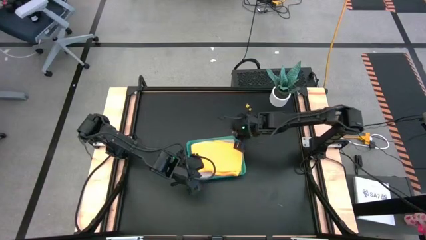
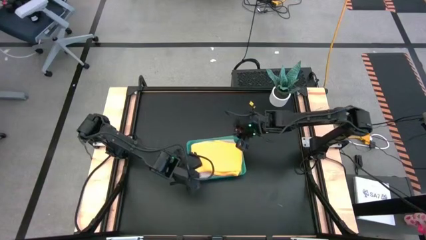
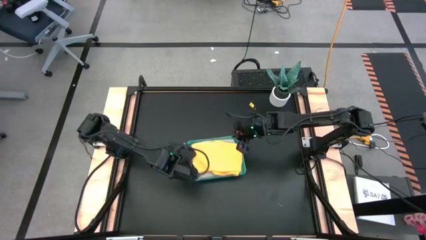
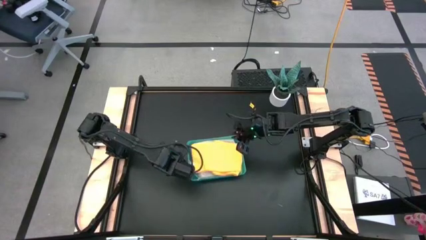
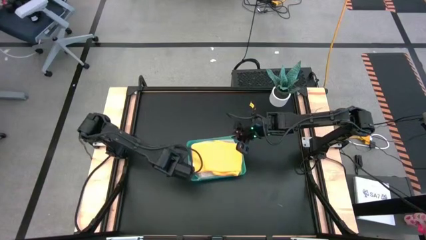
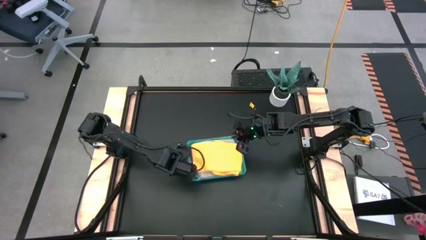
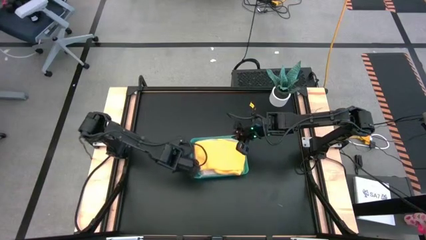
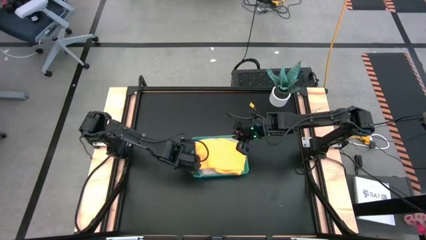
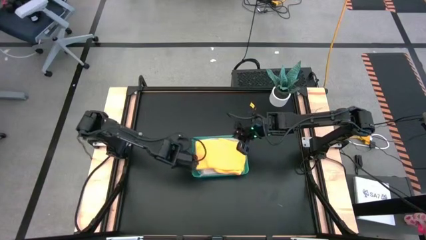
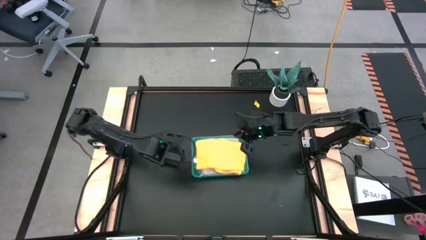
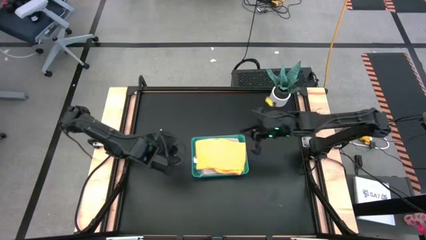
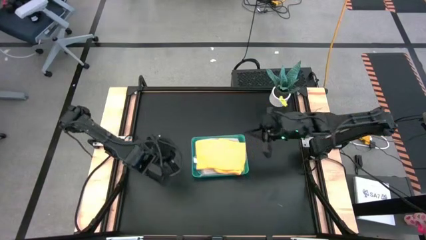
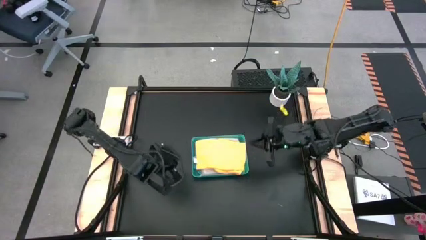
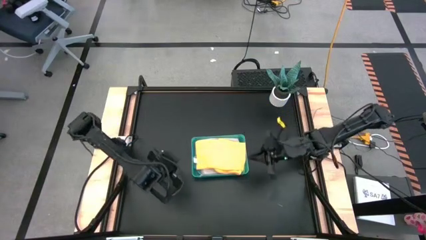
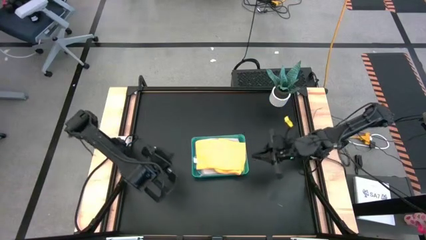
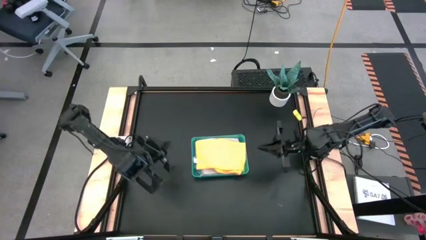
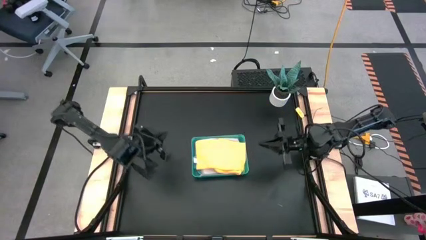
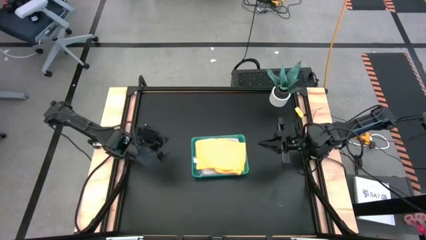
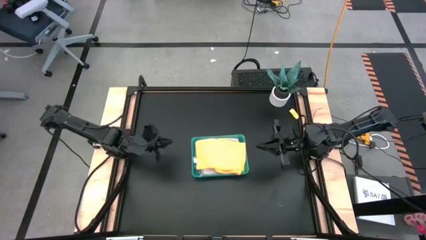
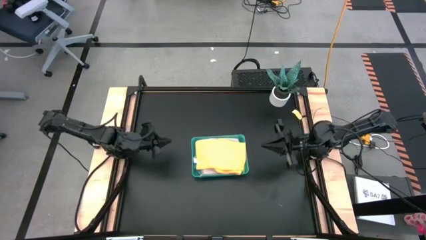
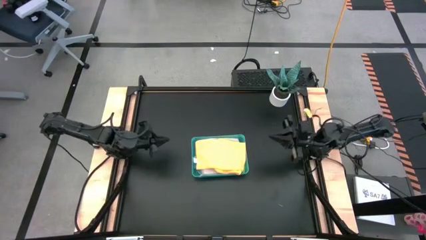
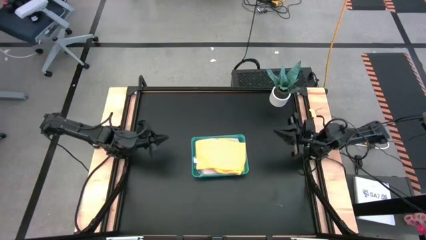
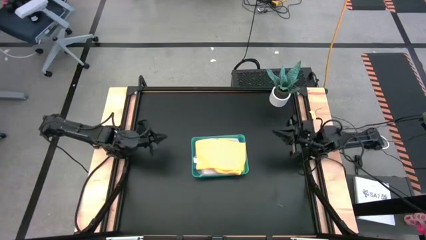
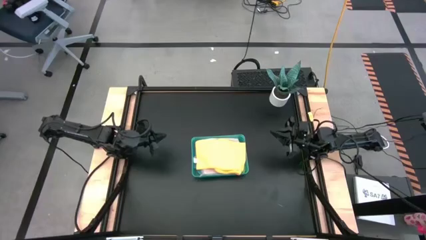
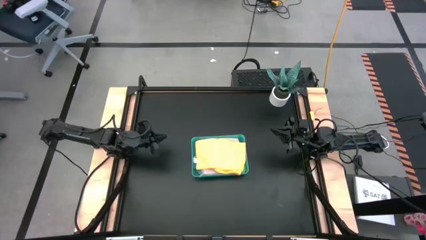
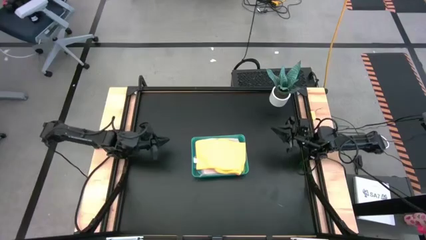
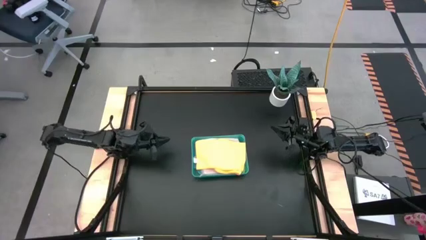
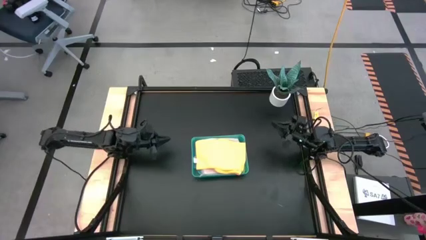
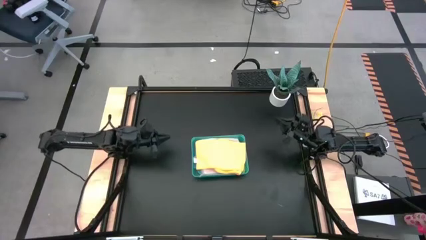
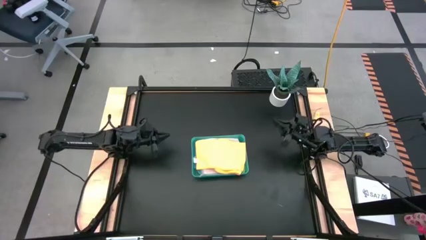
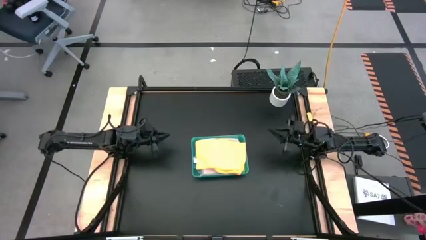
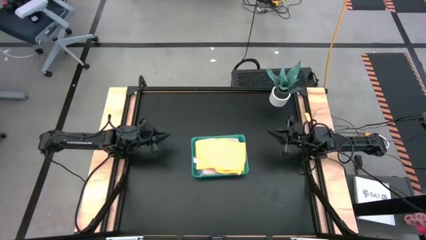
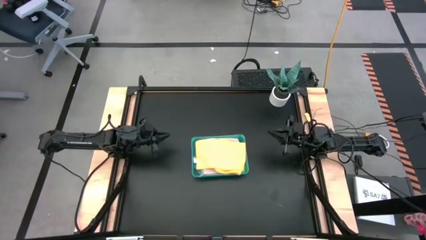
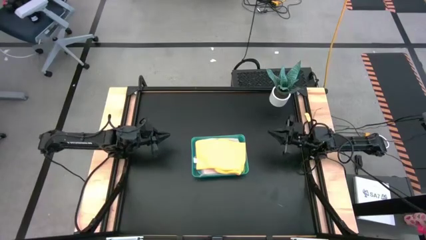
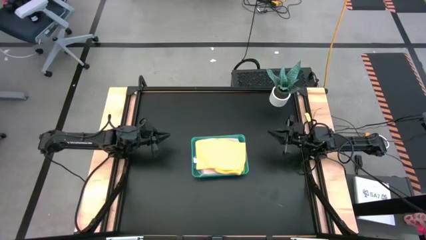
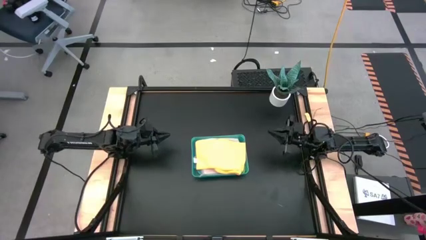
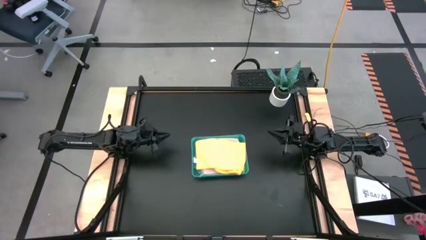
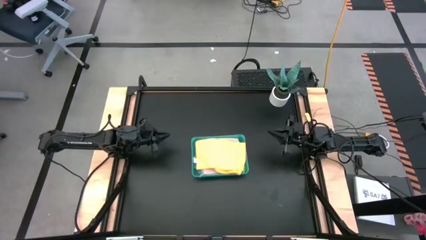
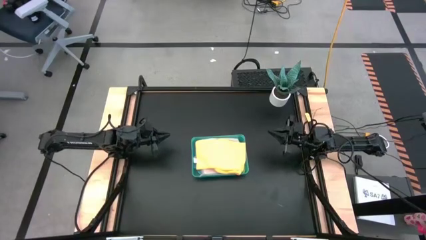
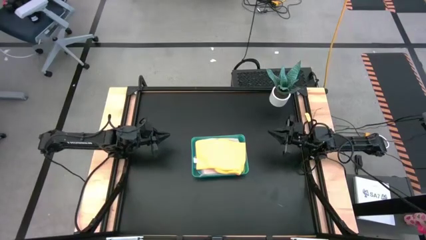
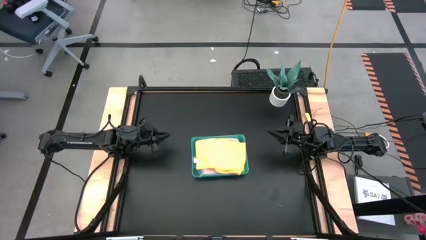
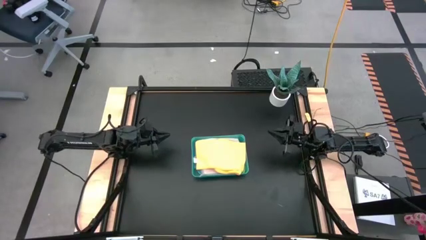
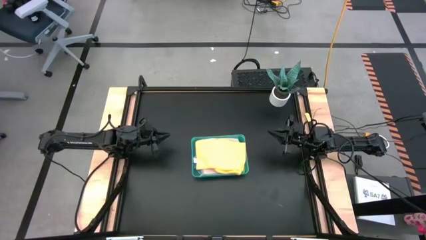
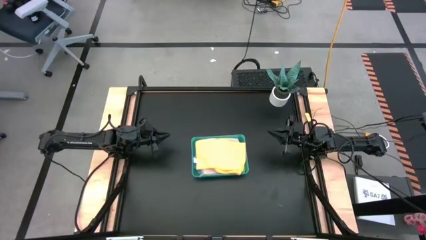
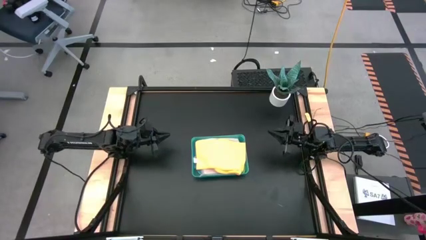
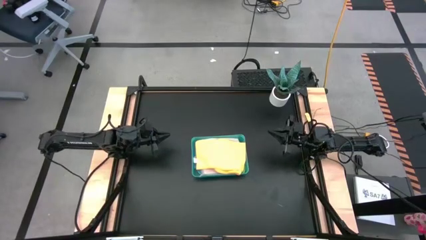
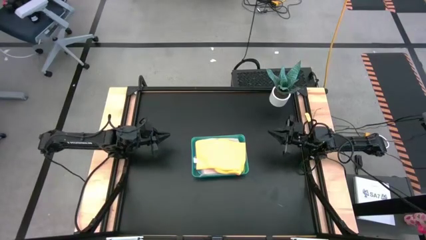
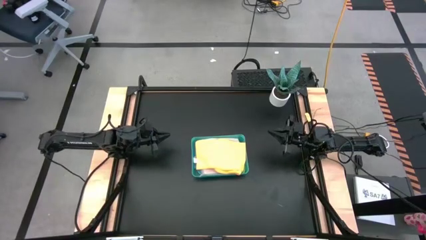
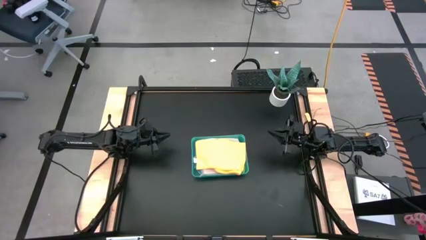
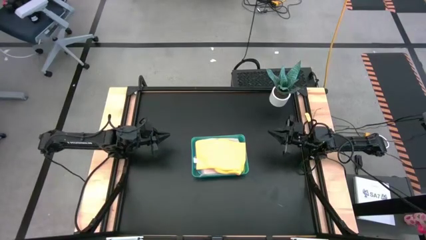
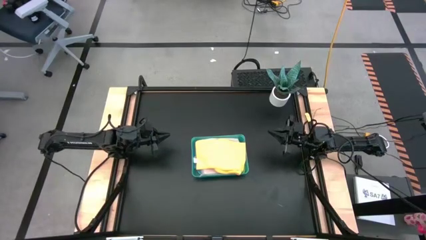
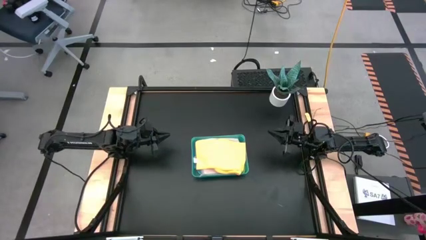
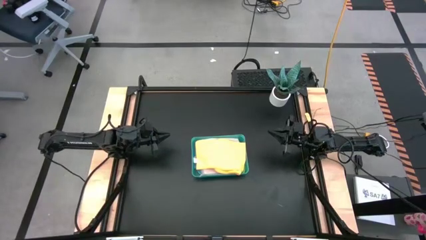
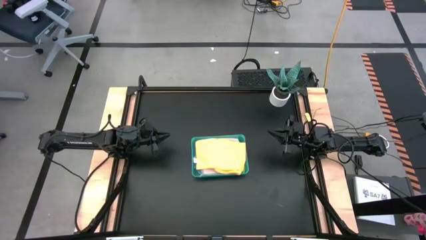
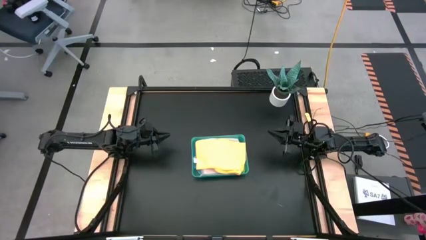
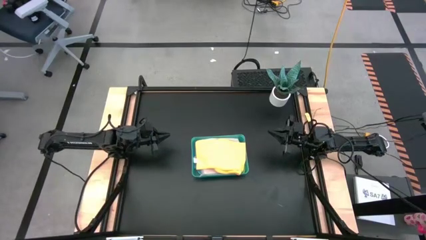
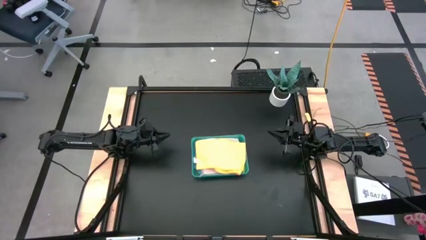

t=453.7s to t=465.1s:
Task: Fold microfiber towels
Return to Home Position
